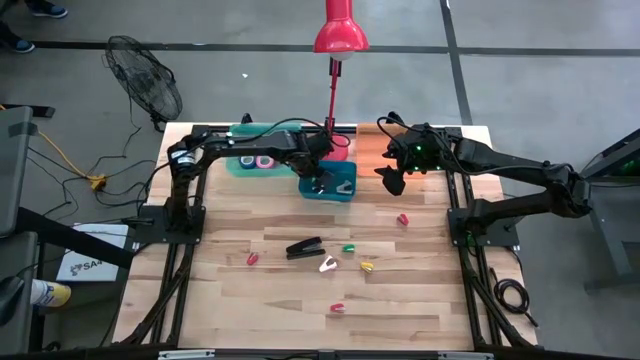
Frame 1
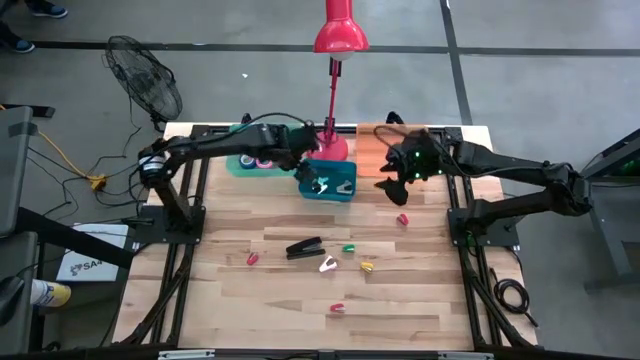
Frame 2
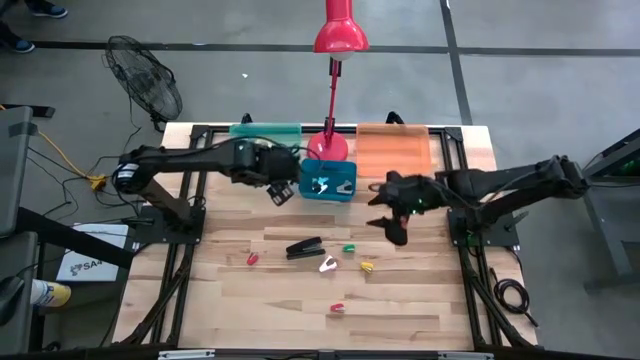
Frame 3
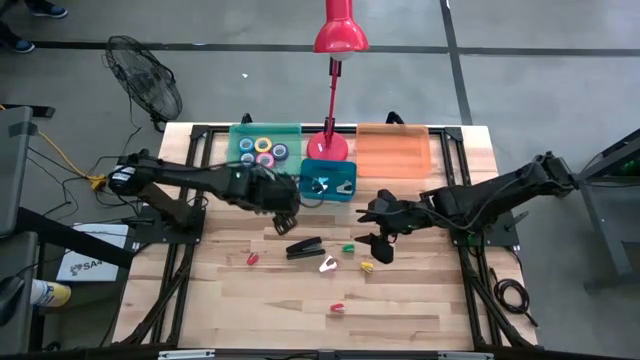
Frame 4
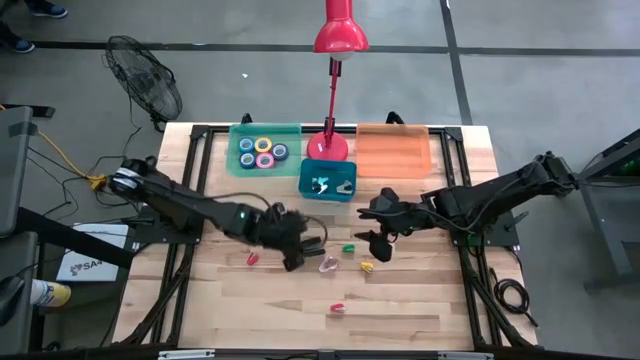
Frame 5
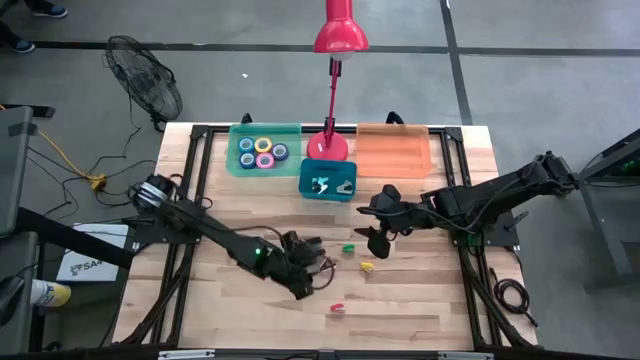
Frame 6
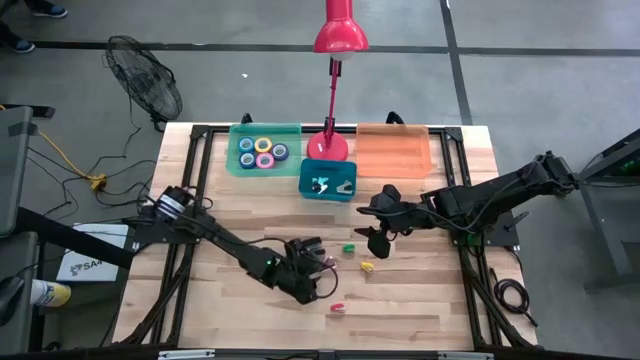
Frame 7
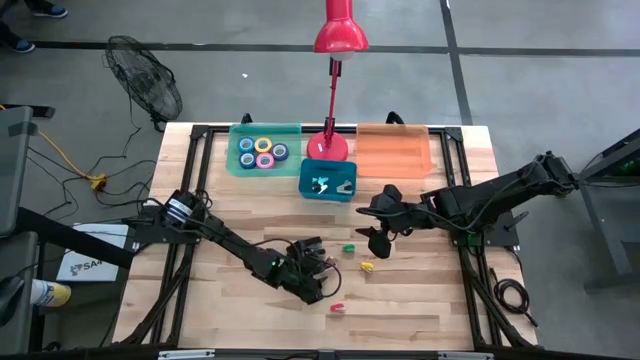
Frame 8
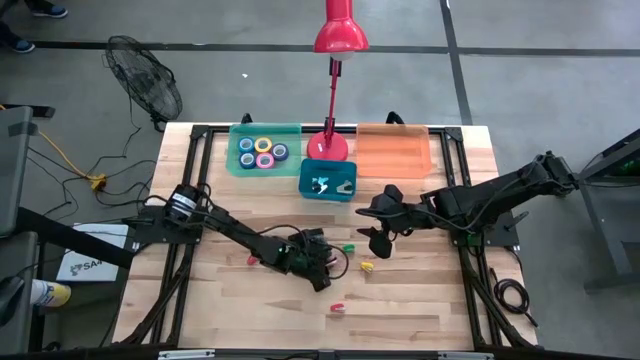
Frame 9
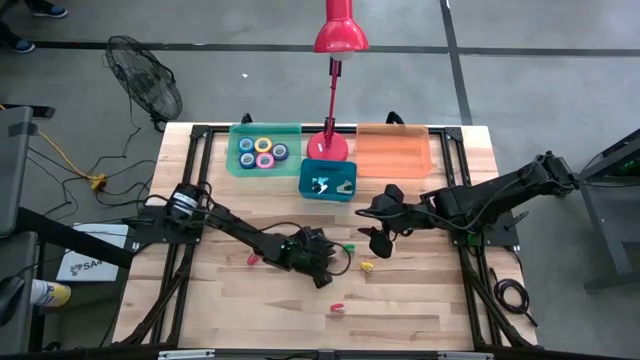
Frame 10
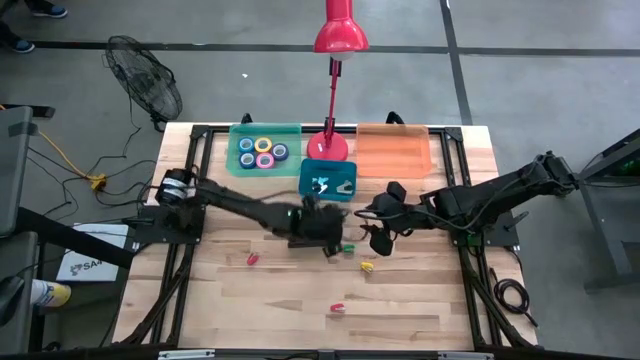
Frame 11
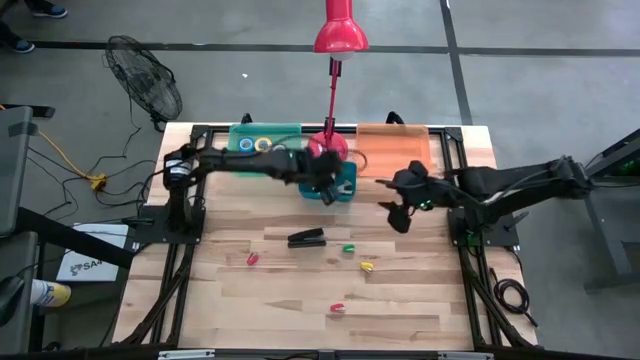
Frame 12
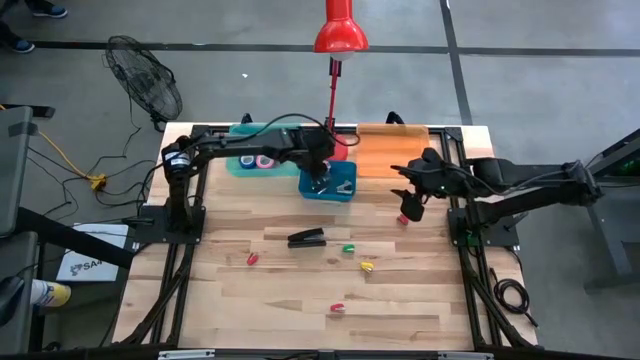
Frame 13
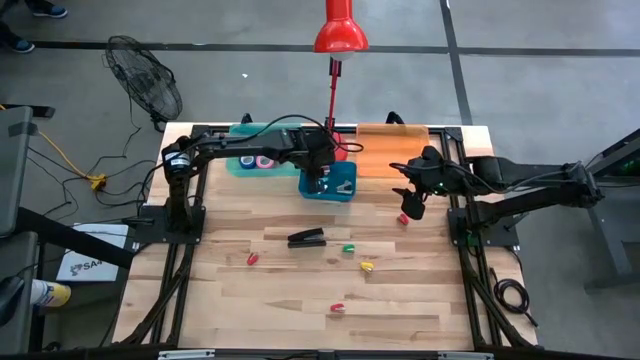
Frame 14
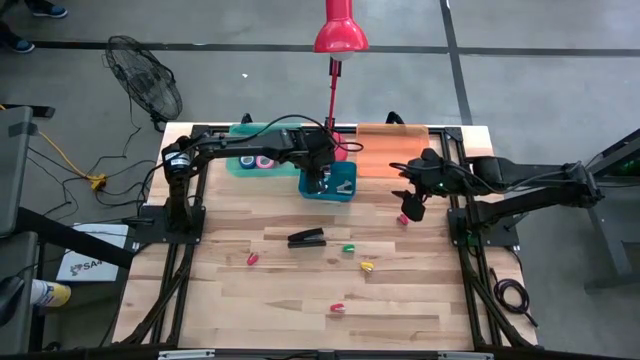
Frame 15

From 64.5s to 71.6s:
Task: Pick and place Stapler, Stapler remover, tape
Put the pink staple remover into the blue bin

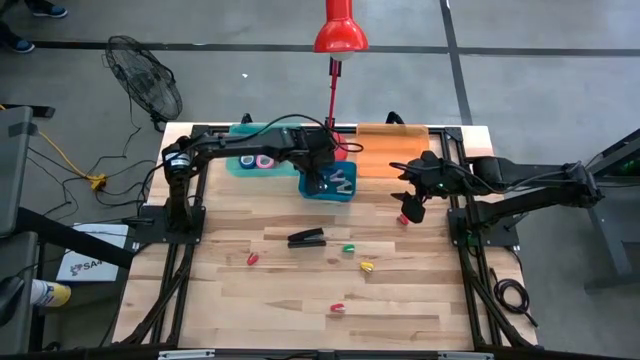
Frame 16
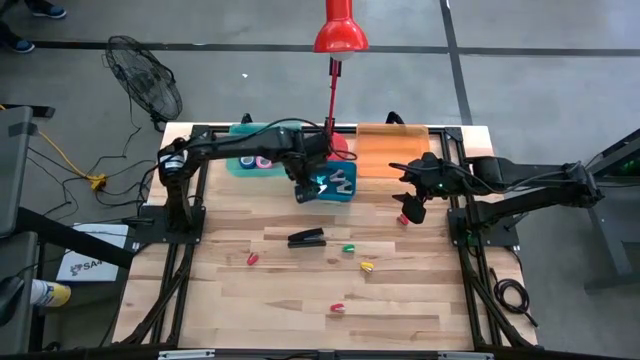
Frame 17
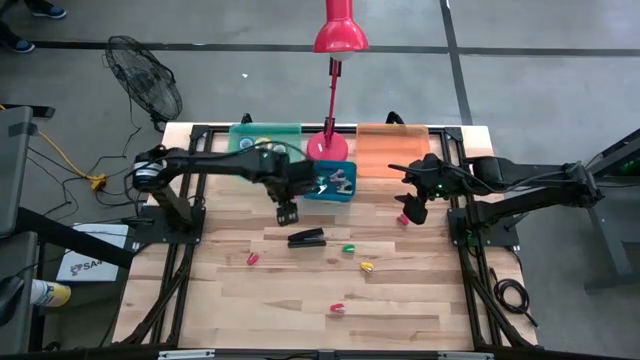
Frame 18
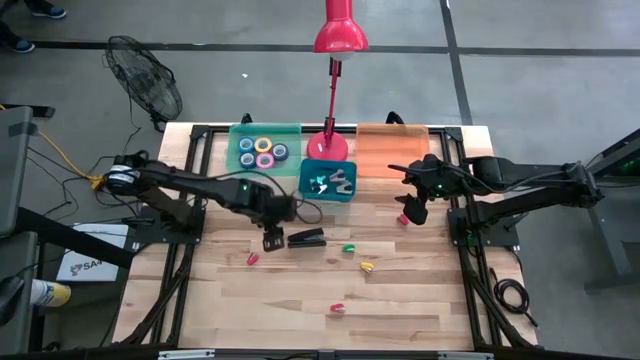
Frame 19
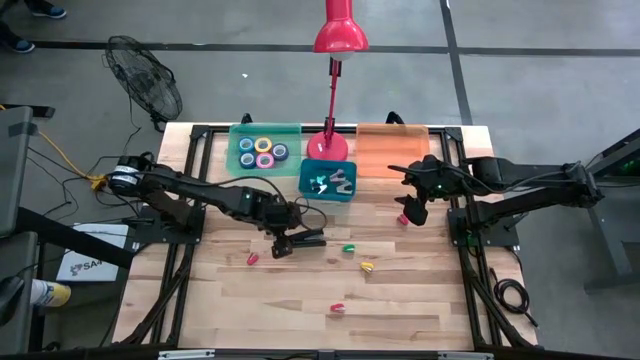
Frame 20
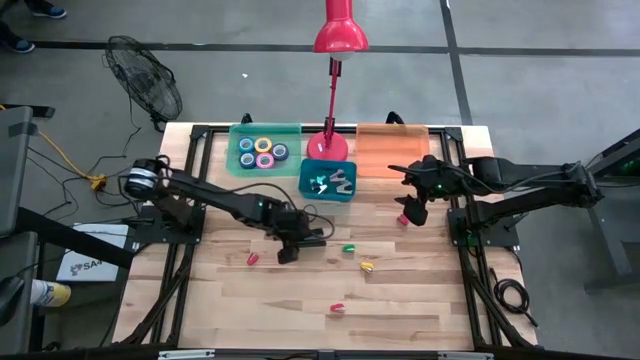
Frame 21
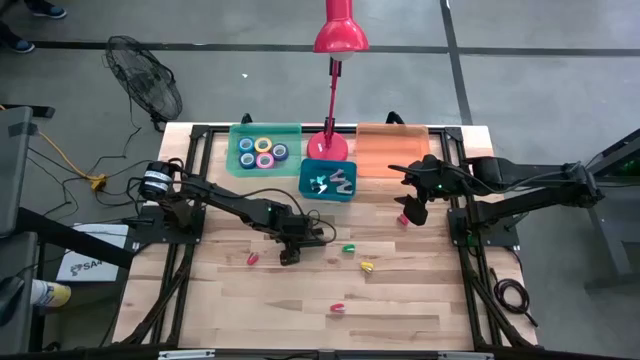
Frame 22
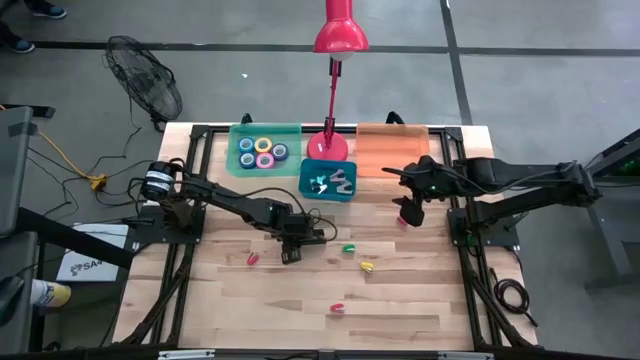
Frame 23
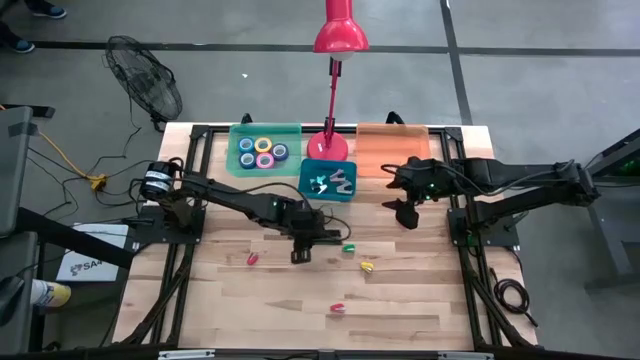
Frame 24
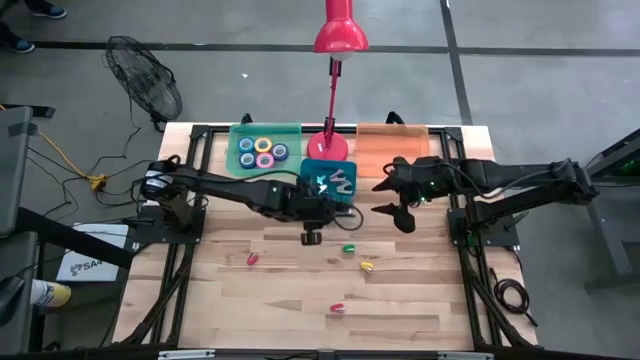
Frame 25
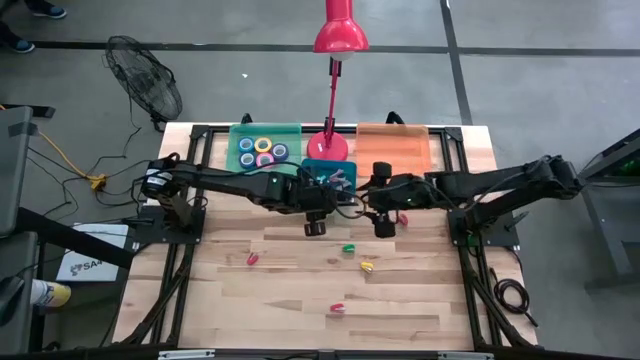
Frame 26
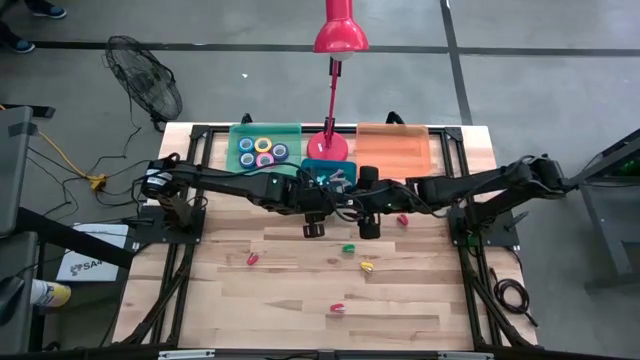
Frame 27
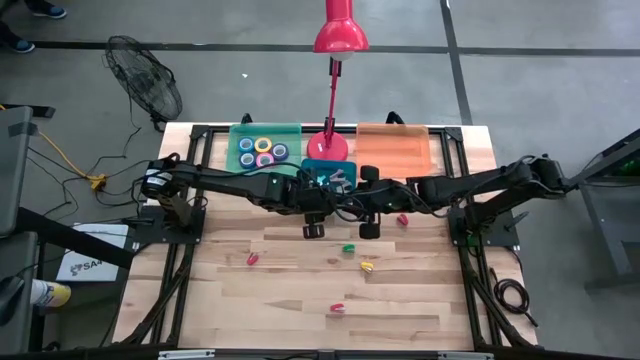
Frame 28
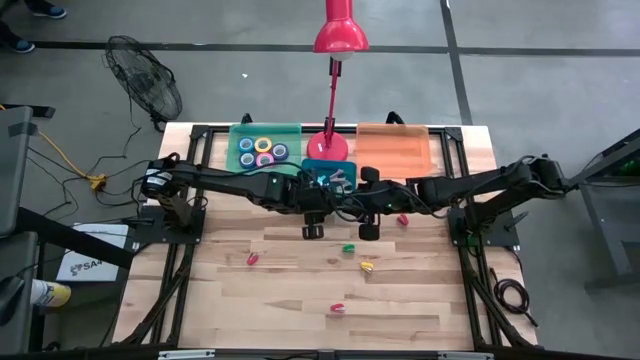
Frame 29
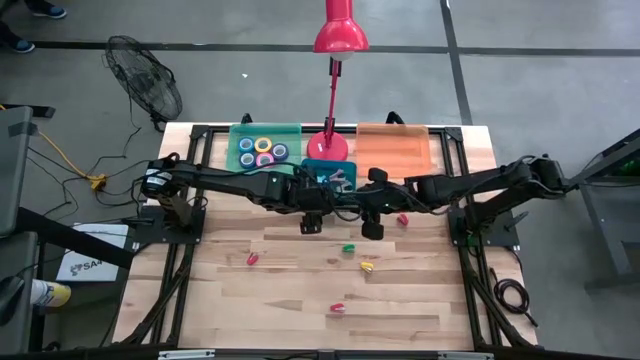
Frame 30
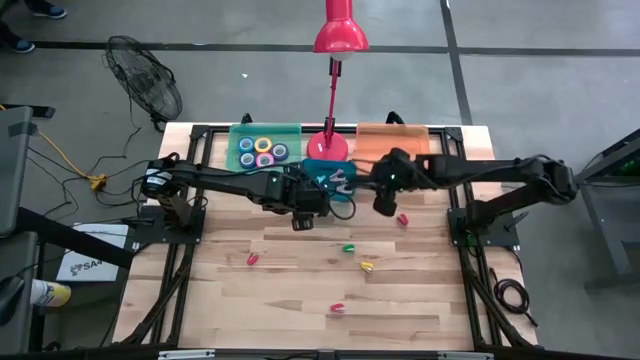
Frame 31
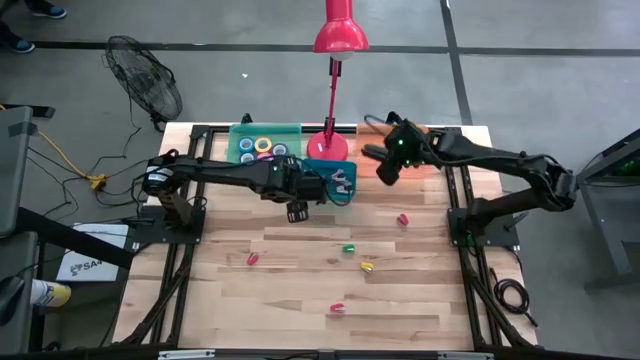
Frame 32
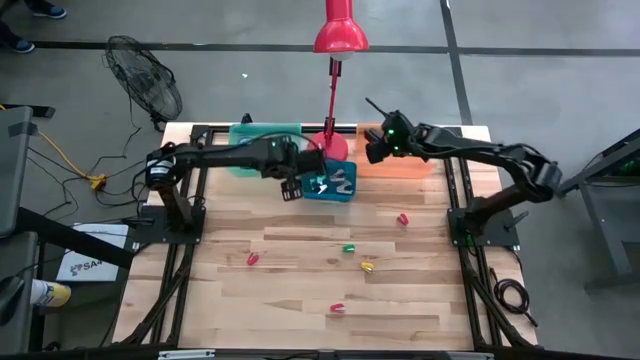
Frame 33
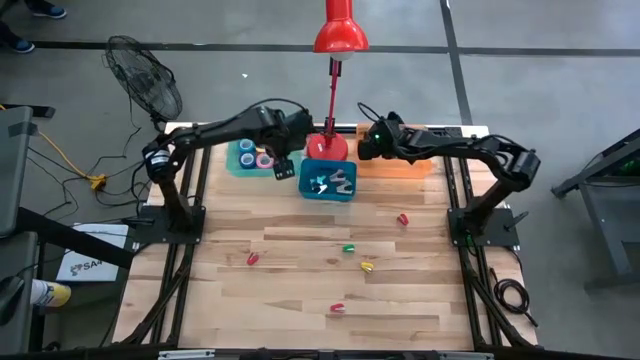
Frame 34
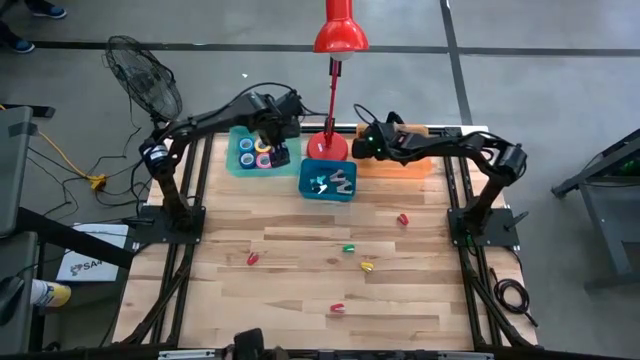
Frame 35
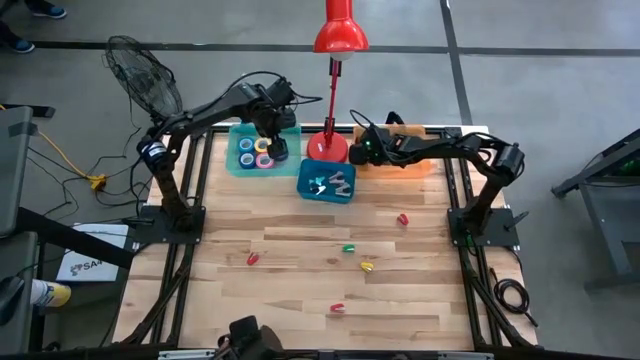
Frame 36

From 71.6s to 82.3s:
Put the black stapler into the orange bin

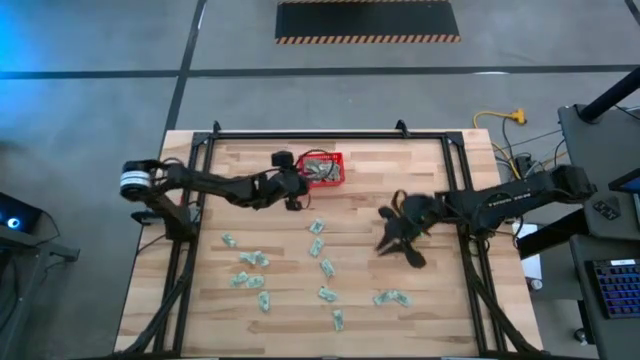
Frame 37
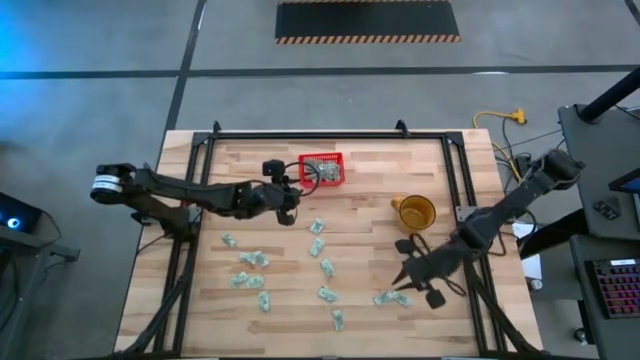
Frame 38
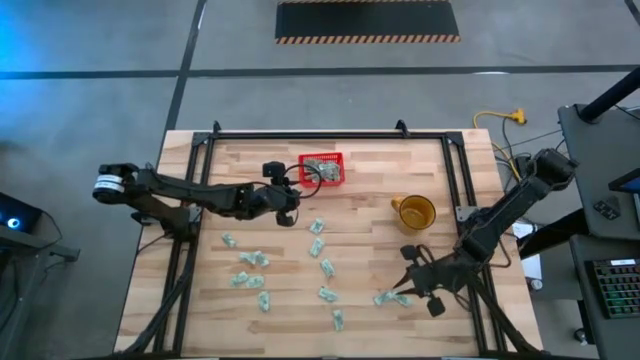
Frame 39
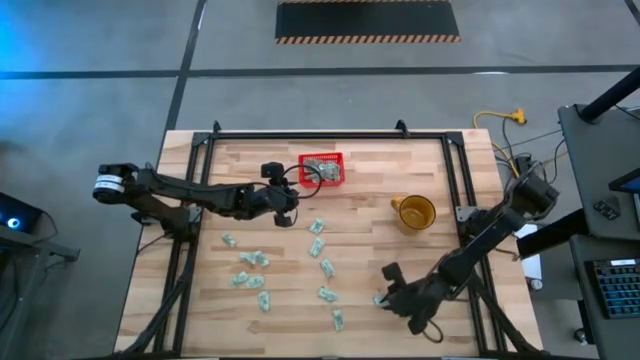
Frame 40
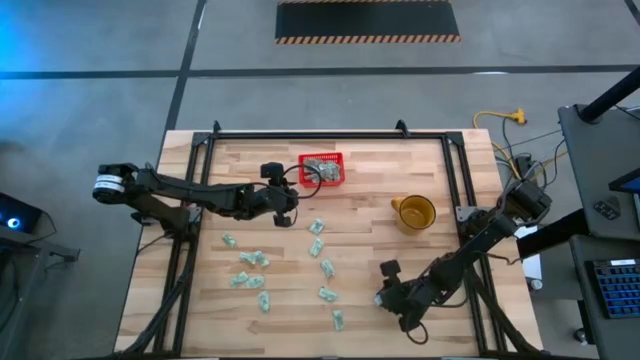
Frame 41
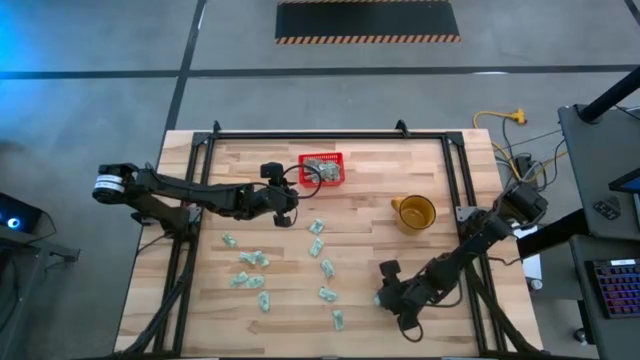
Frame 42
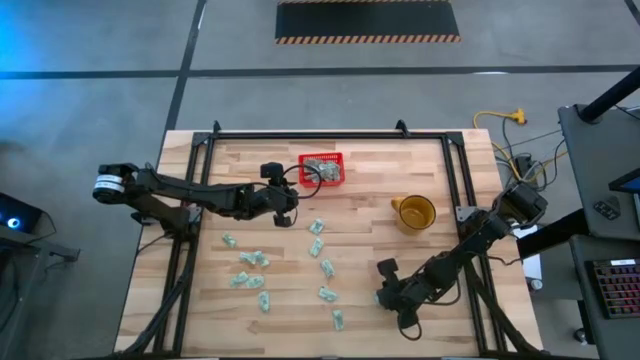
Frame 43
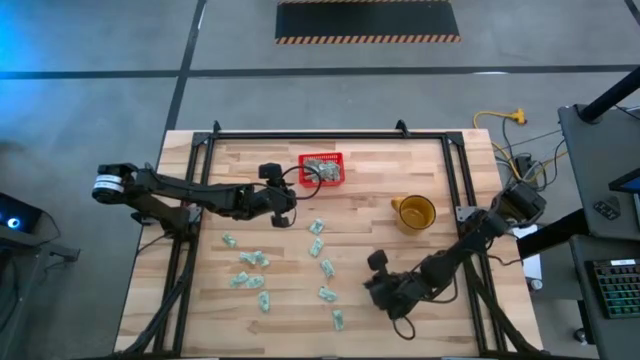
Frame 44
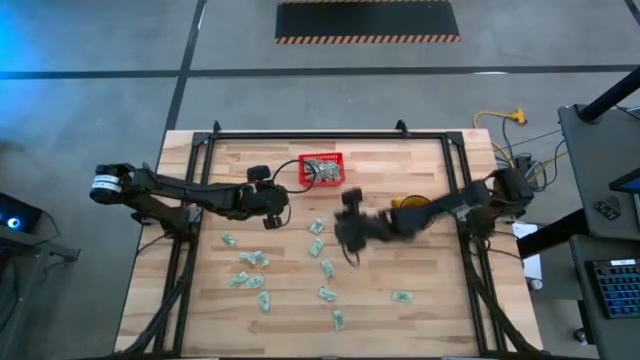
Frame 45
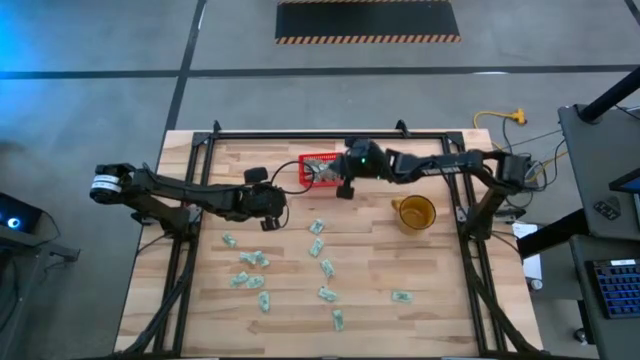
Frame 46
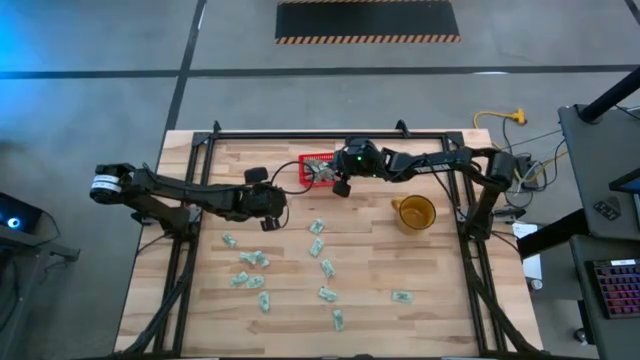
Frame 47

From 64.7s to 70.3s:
Task: Pick and place Stevia / Truvia into bins
Put the white stevia packet into the red bin
